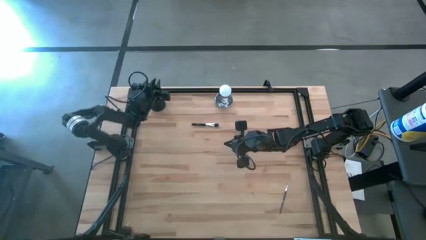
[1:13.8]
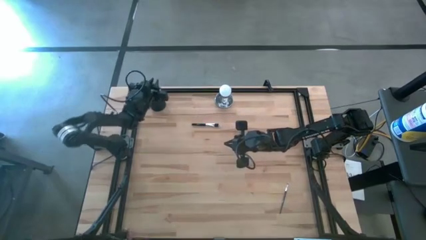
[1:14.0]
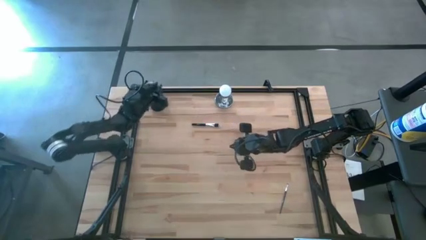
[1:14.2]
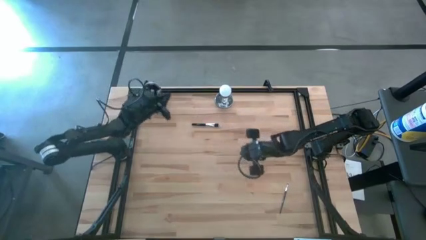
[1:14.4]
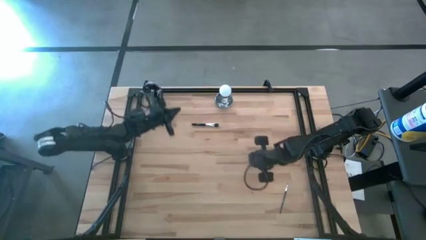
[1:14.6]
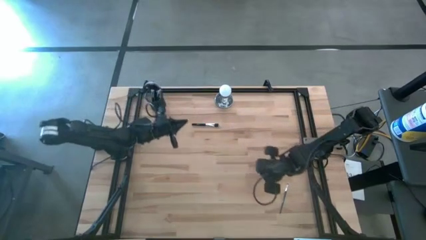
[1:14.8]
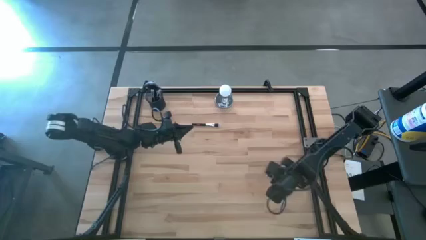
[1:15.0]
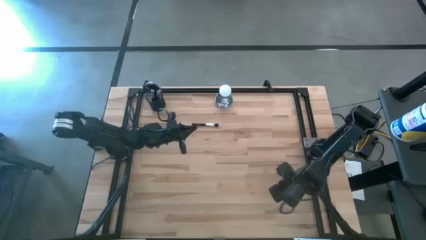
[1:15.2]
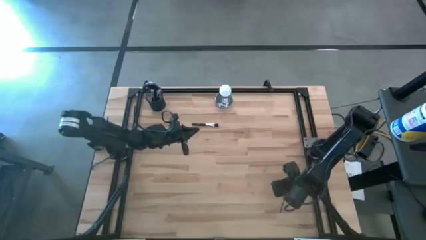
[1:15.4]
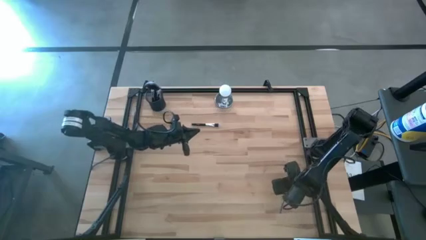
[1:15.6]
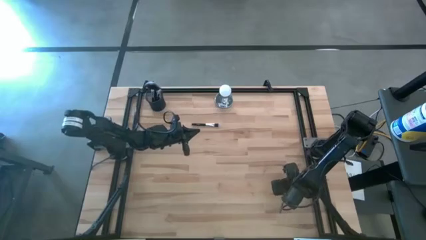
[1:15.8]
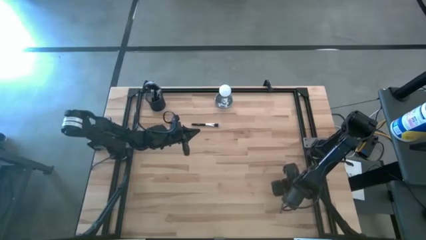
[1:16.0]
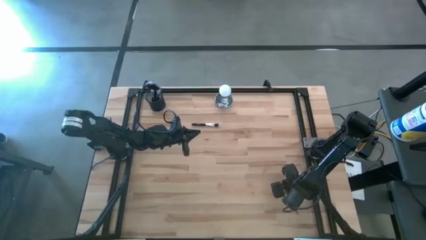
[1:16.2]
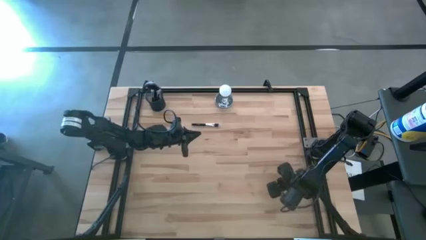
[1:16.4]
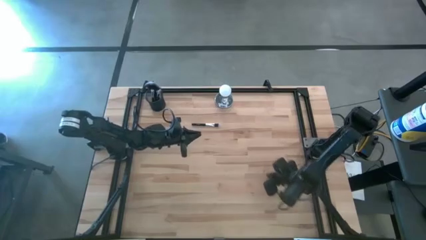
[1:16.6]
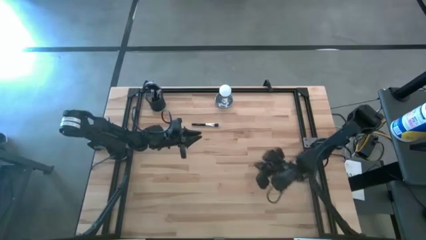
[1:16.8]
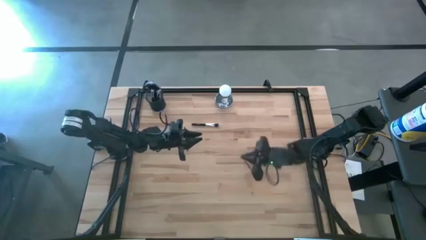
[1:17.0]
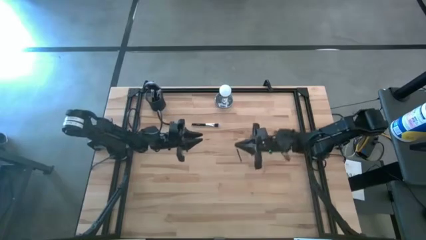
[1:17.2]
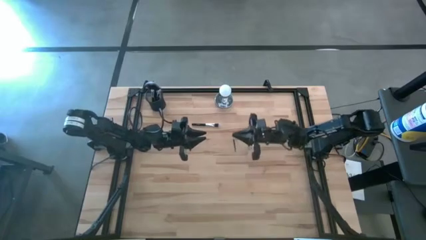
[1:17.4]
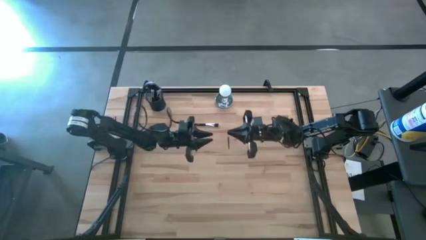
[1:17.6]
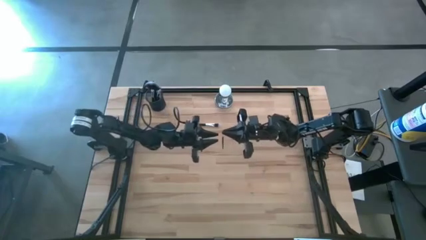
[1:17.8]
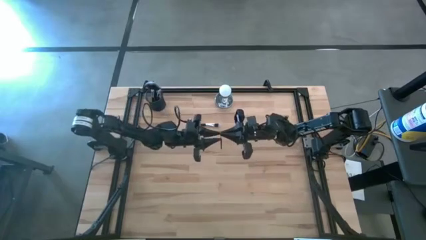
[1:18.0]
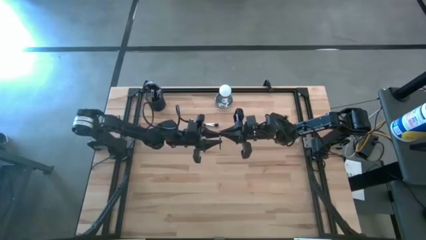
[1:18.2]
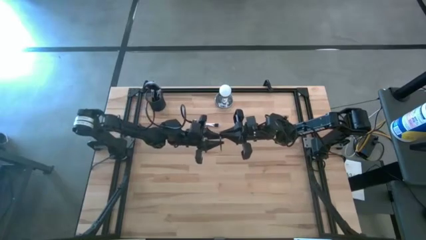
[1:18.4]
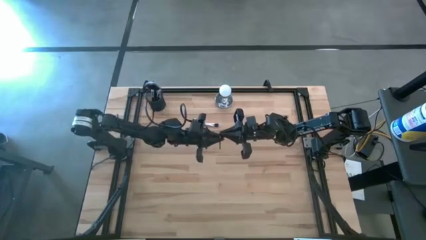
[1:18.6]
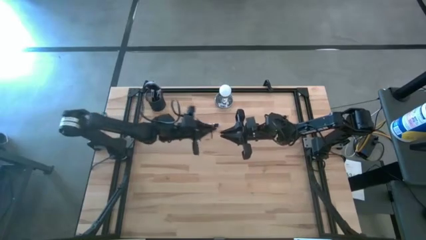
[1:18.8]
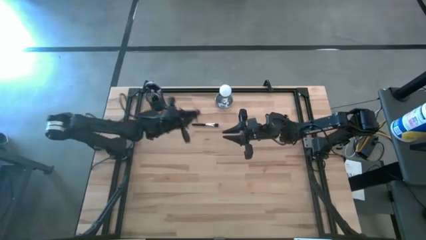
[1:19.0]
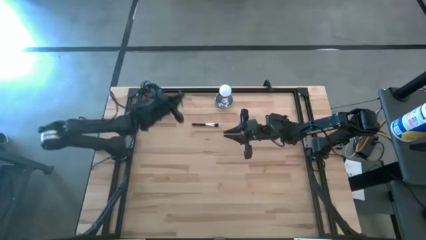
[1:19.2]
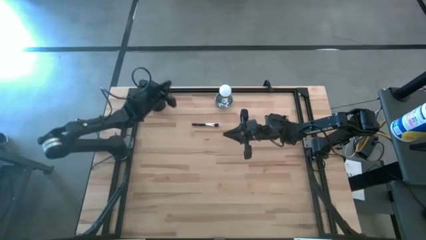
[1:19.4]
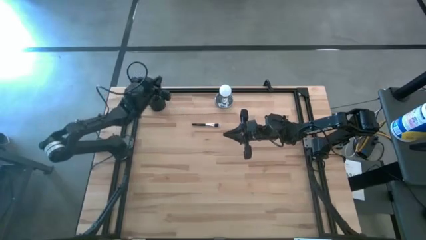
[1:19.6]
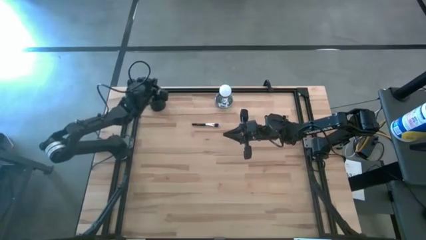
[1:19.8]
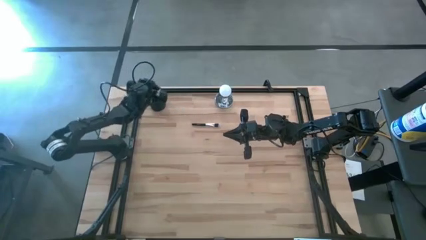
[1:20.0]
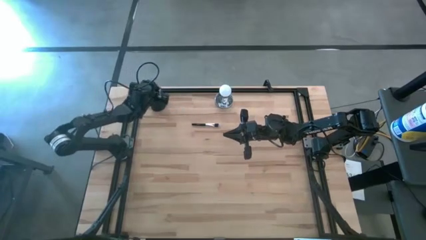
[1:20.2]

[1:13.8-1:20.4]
Task: Put items in baskets/containers
Put the black eyeshadow brush into the black brush holder

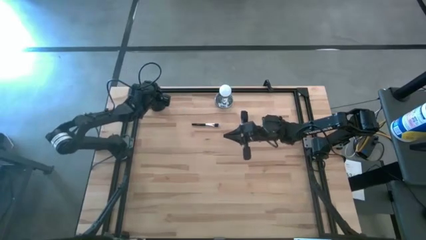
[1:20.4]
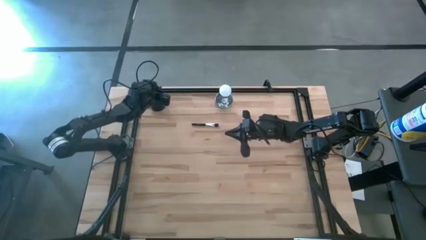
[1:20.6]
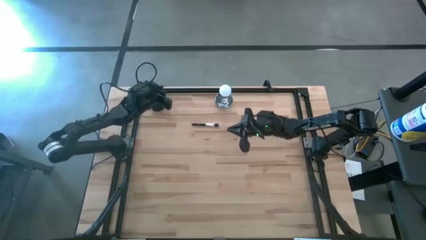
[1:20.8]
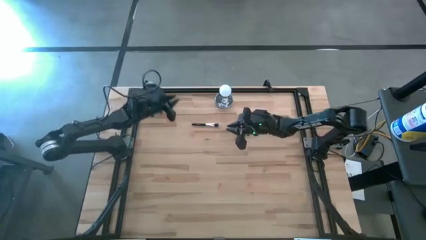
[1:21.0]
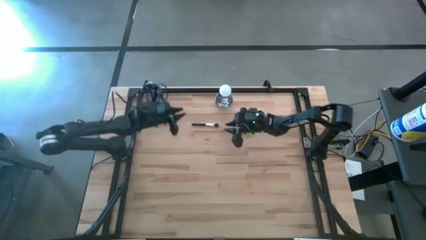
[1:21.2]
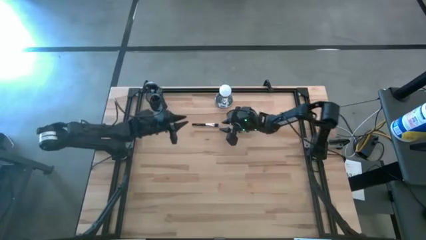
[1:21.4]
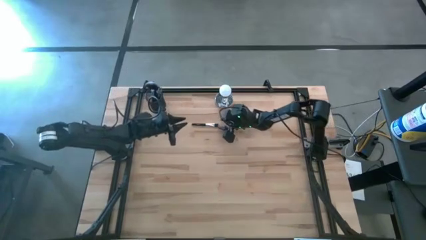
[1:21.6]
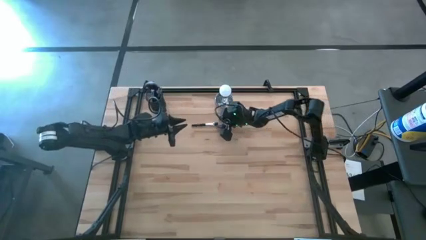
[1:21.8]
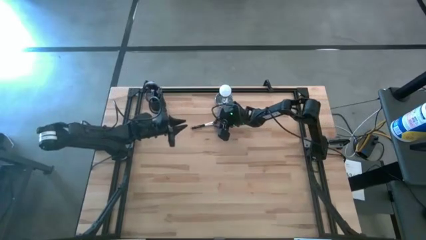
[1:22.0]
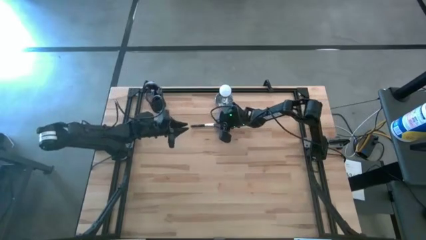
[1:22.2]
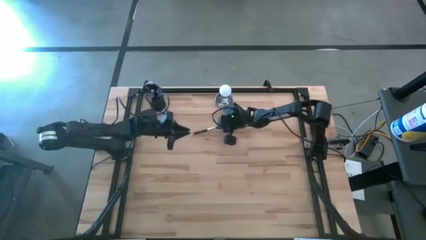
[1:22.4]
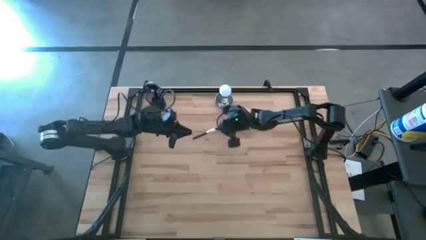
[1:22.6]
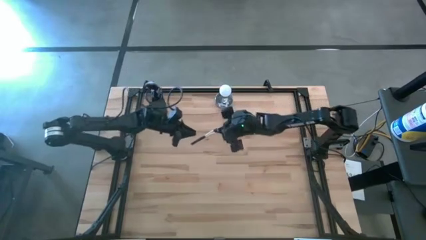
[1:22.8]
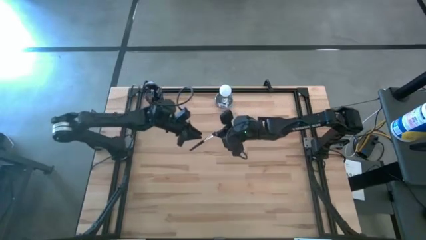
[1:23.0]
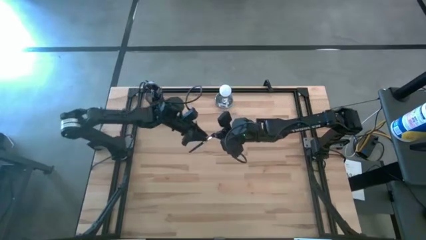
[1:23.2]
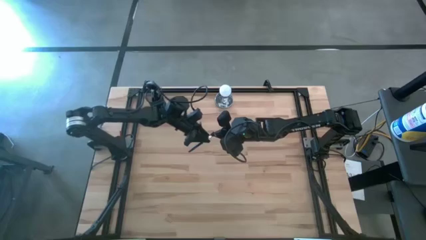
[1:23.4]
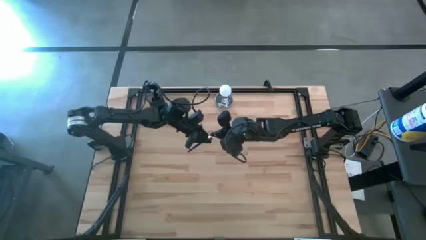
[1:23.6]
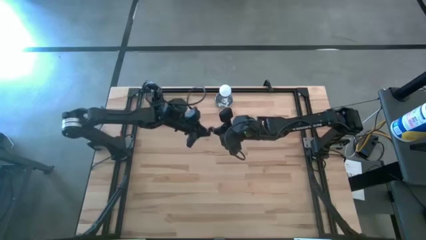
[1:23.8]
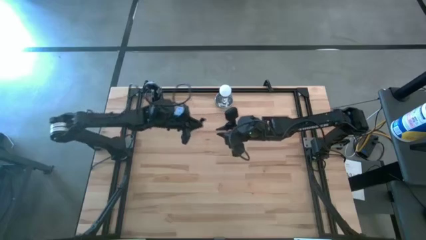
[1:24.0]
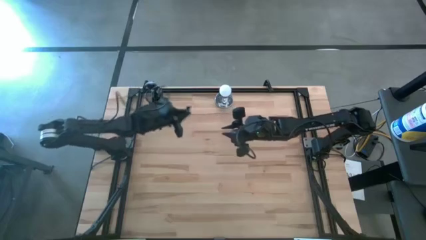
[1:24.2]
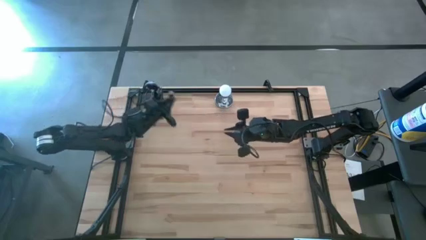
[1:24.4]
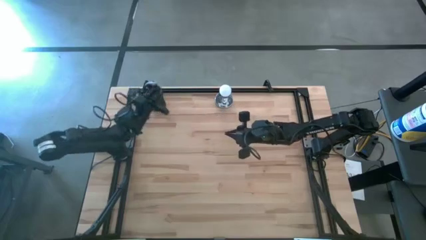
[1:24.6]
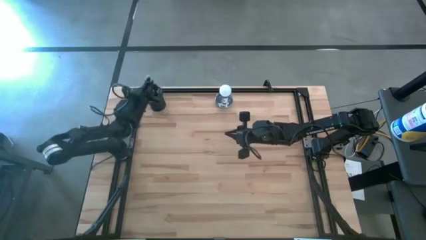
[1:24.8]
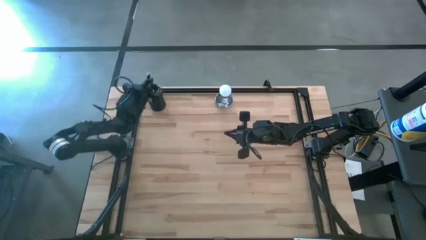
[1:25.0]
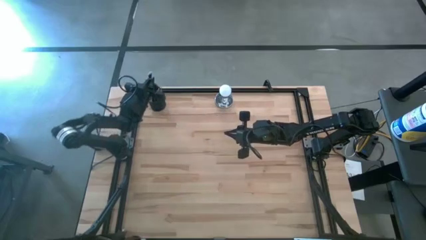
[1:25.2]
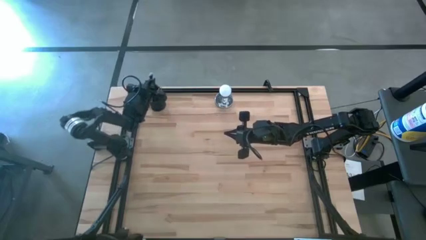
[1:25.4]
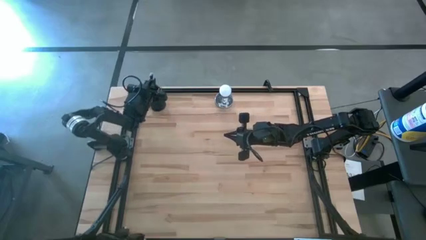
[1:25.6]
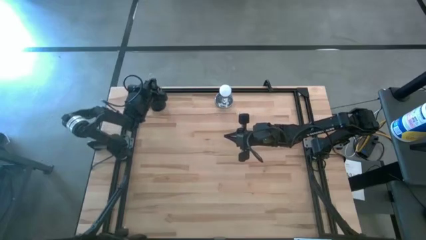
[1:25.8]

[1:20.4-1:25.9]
Put the black powder brush into the black brush holder

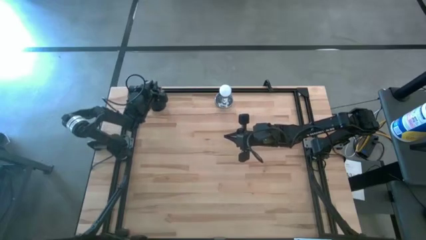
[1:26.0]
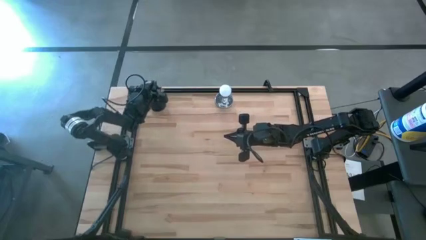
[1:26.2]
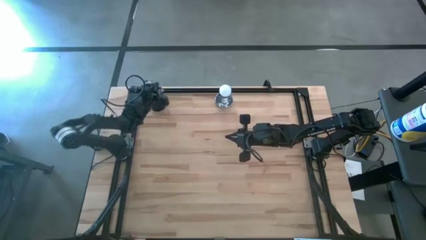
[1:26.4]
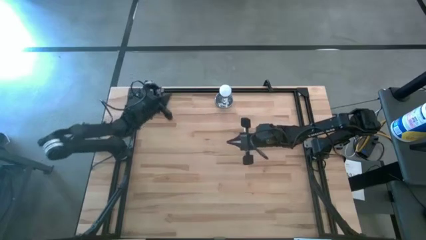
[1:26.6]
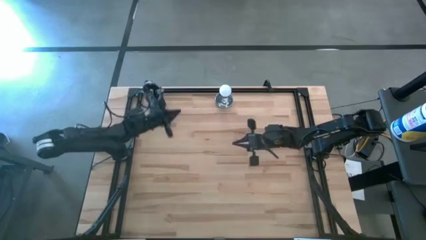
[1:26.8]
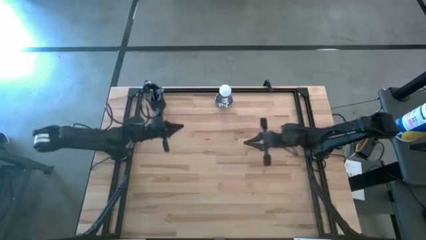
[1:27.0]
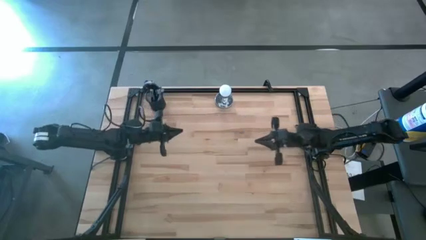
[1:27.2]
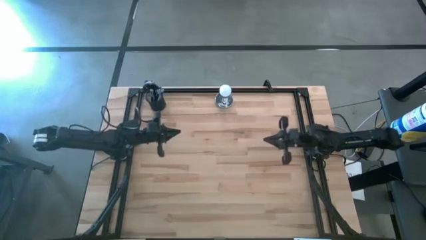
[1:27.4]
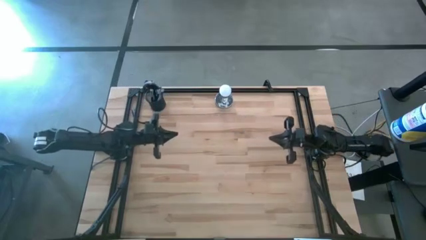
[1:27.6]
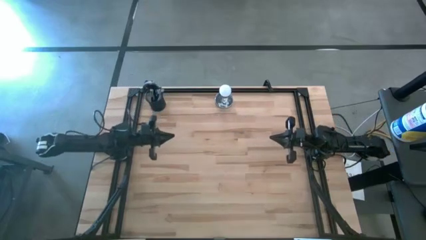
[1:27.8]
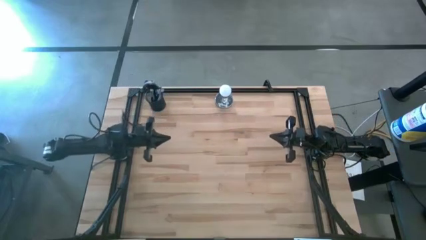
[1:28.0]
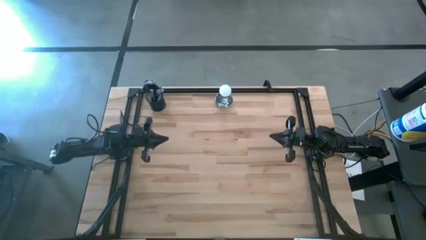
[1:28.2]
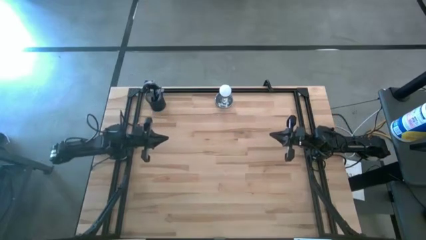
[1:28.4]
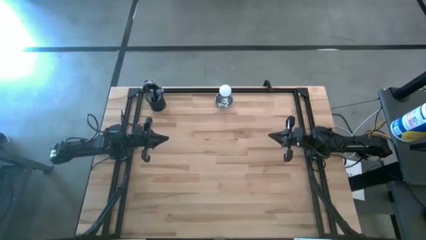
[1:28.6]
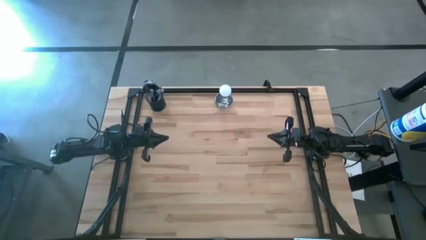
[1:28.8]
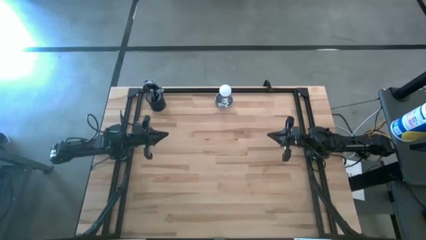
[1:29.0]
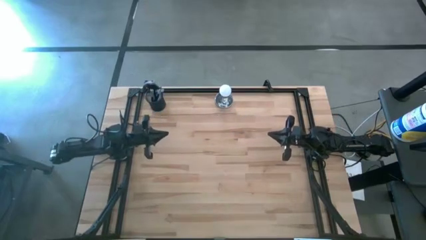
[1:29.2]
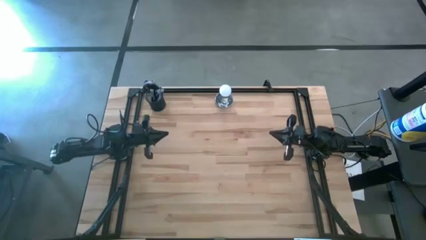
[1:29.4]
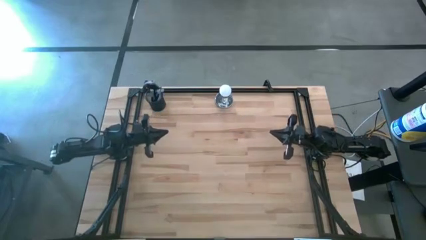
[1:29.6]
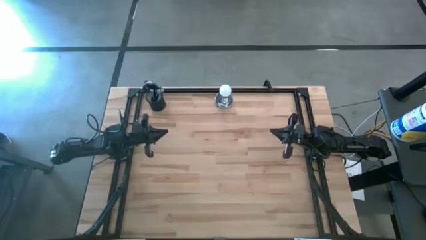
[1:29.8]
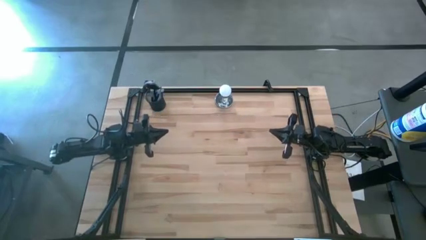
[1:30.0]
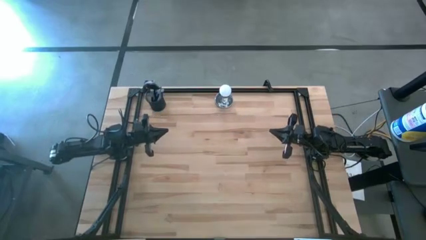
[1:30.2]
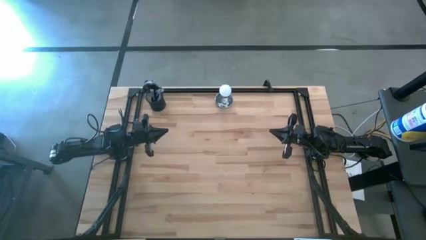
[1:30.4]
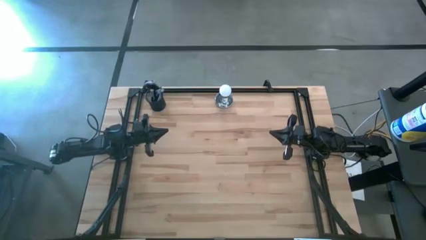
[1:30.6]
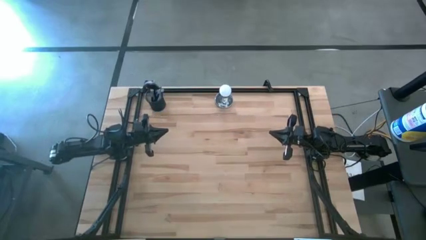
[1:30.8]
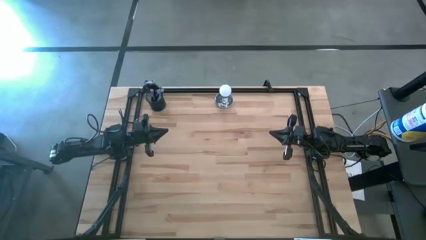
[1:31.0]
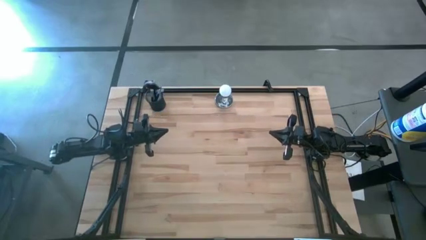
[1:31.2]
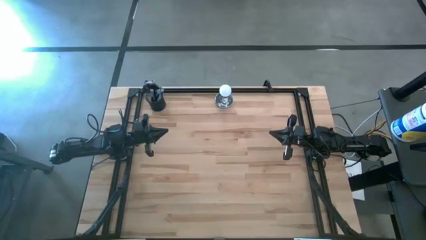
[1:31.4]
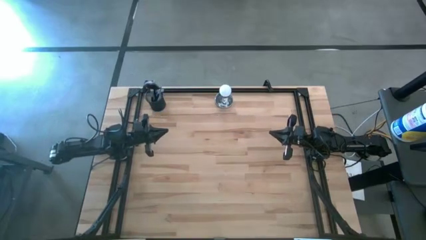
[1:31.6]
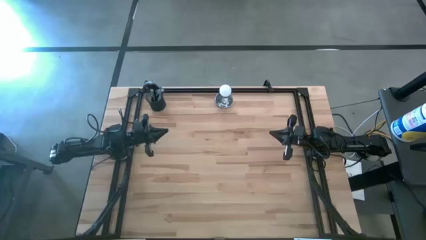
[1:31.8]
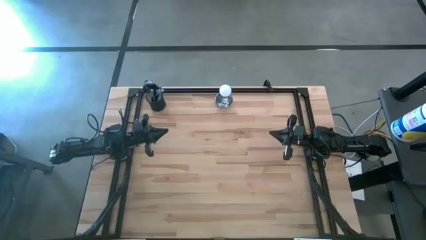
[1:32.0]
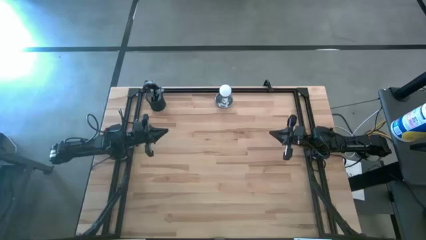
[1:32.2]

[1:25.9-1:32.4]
Return to Home Position
